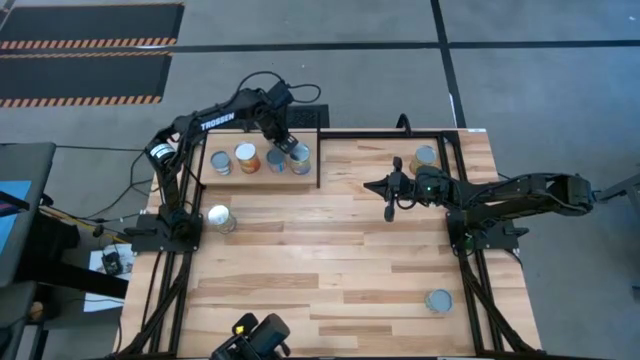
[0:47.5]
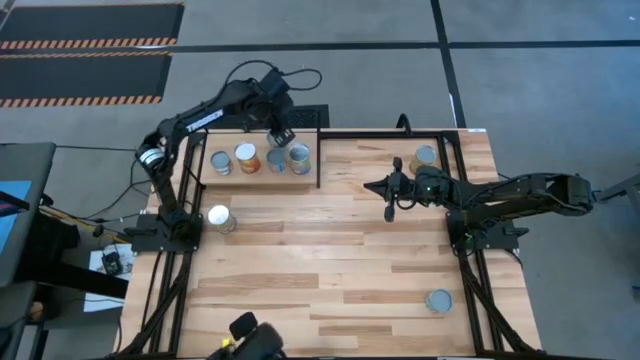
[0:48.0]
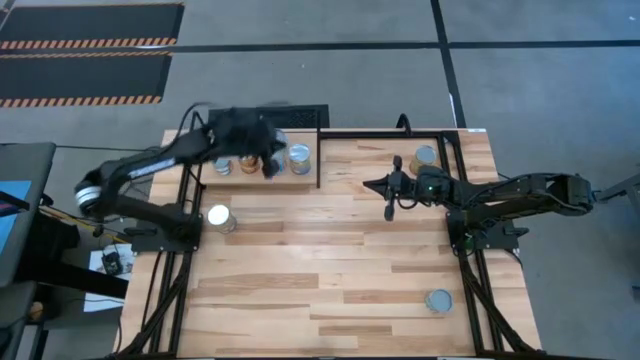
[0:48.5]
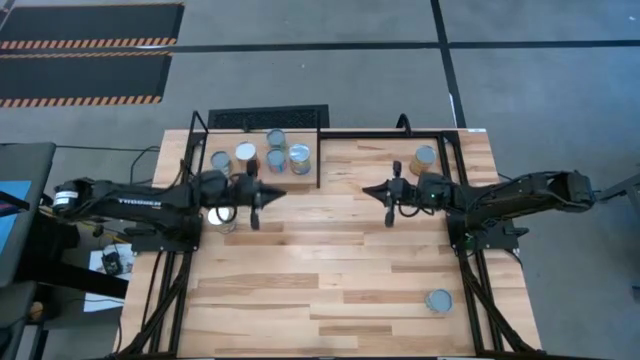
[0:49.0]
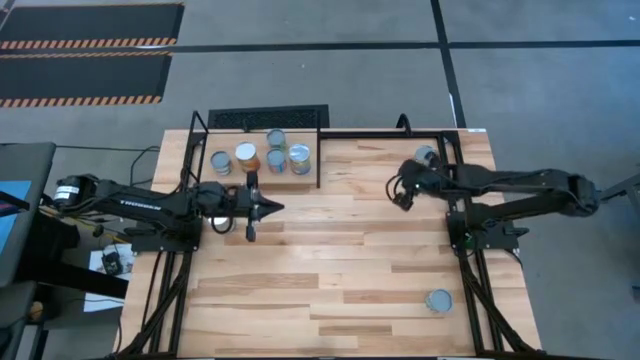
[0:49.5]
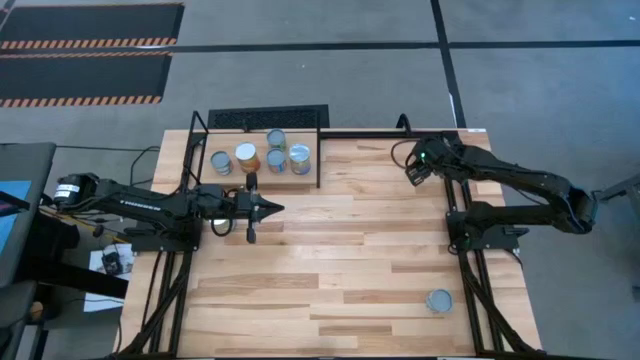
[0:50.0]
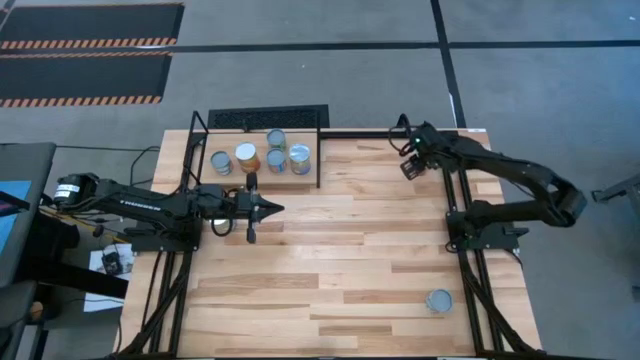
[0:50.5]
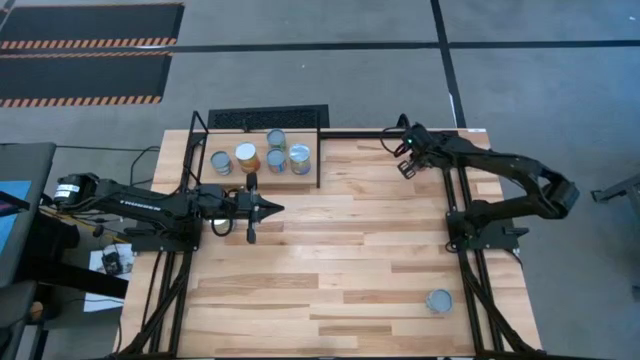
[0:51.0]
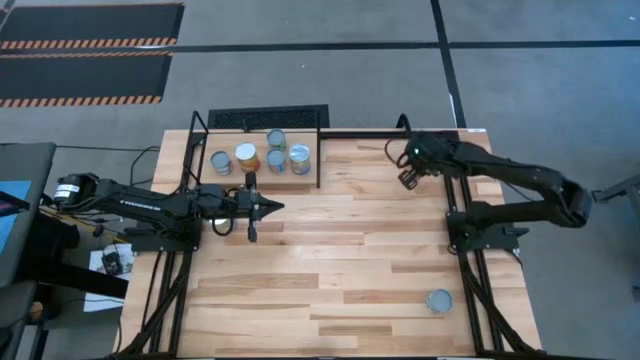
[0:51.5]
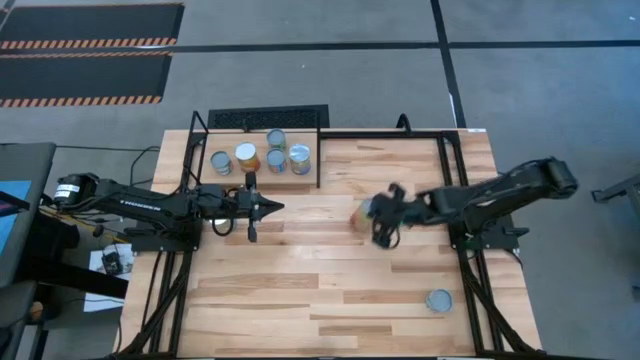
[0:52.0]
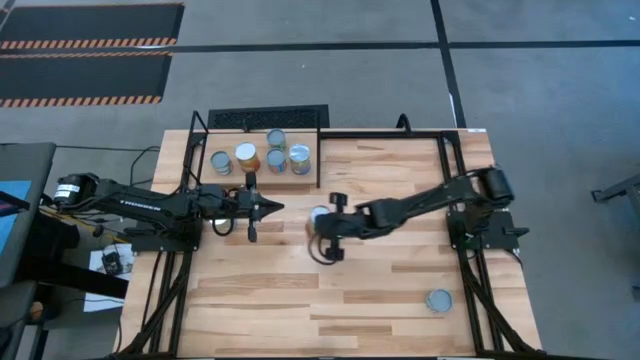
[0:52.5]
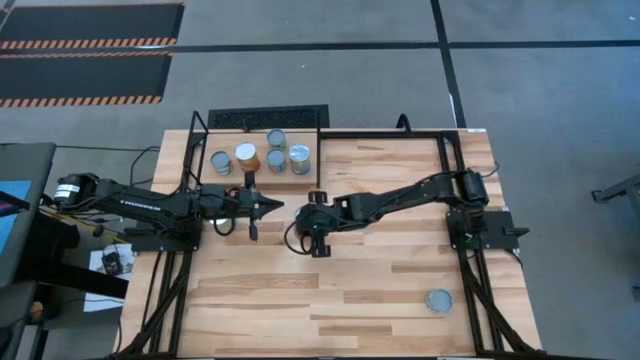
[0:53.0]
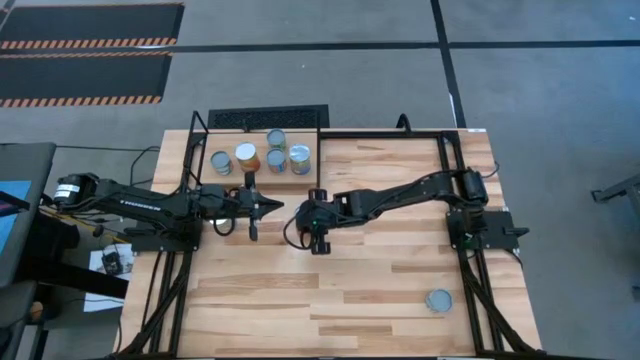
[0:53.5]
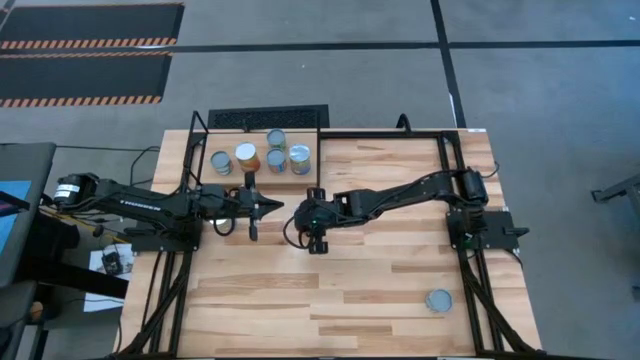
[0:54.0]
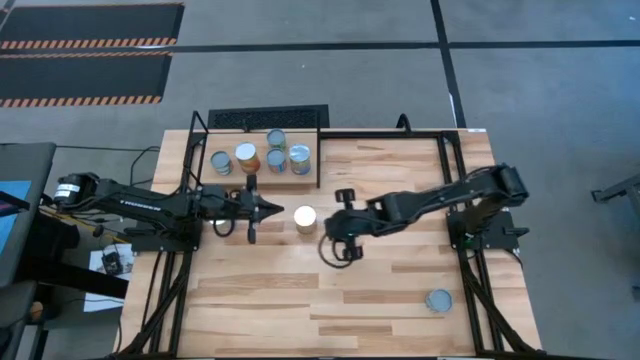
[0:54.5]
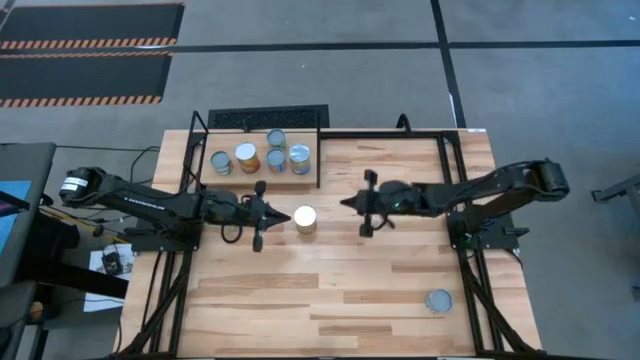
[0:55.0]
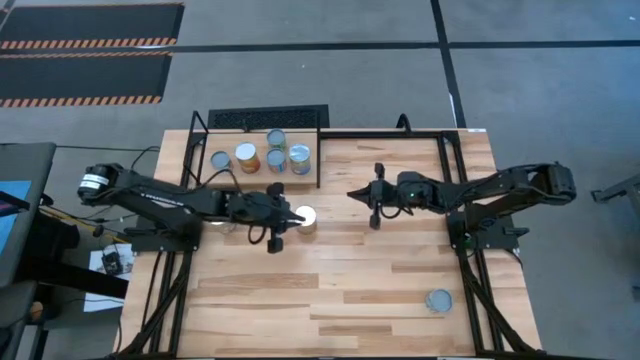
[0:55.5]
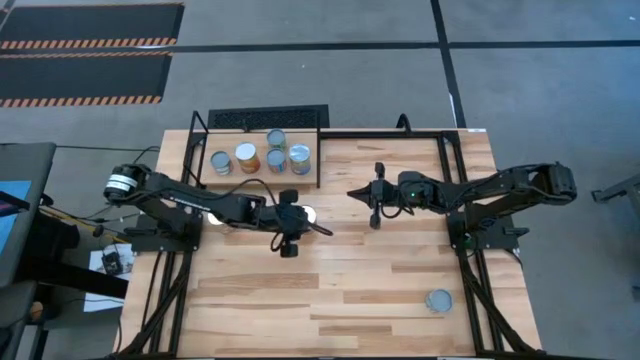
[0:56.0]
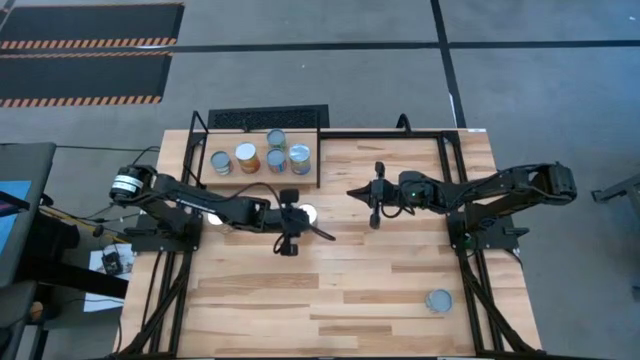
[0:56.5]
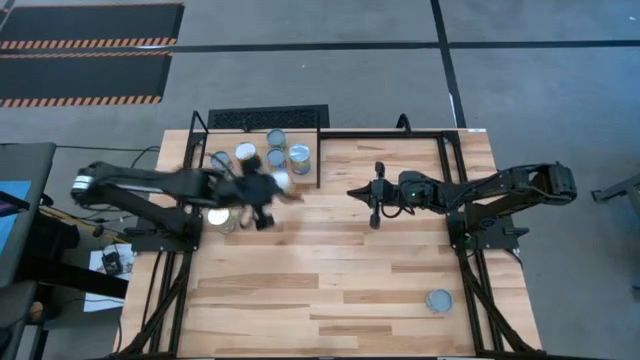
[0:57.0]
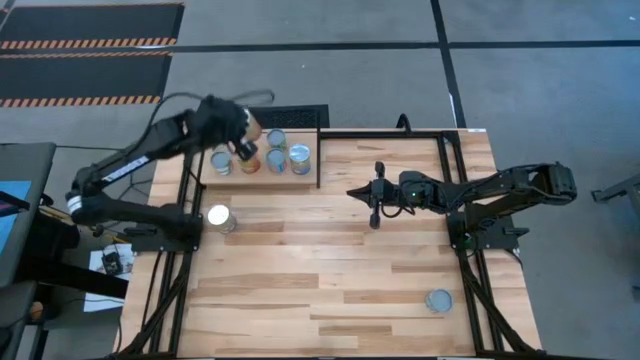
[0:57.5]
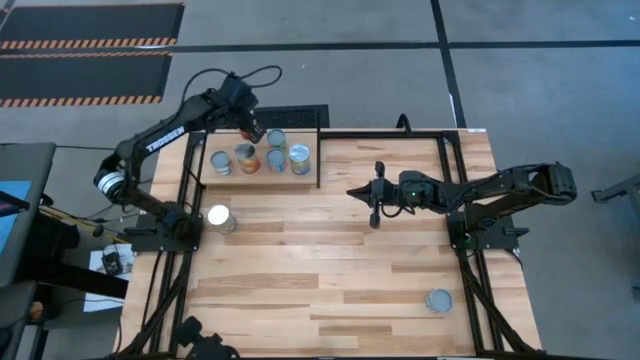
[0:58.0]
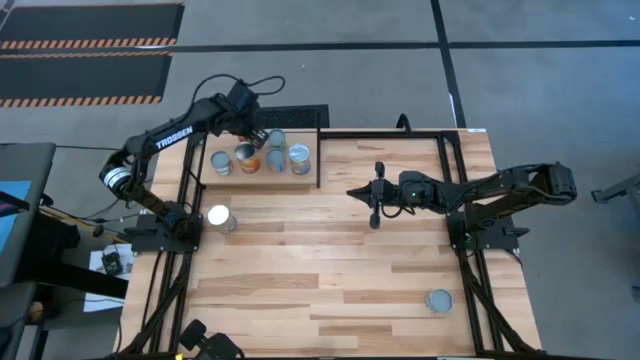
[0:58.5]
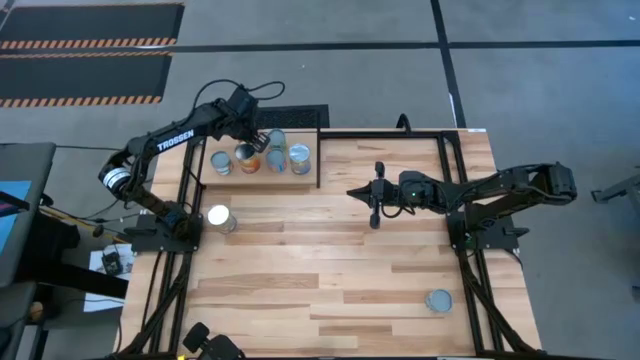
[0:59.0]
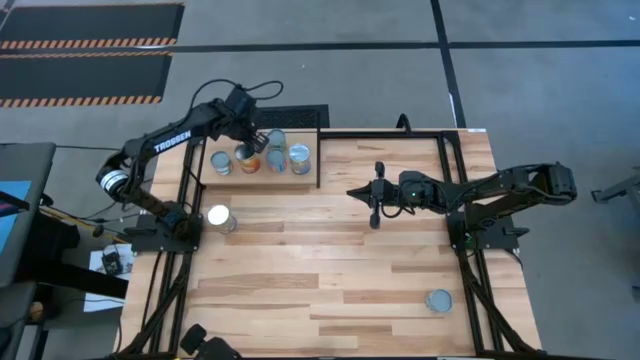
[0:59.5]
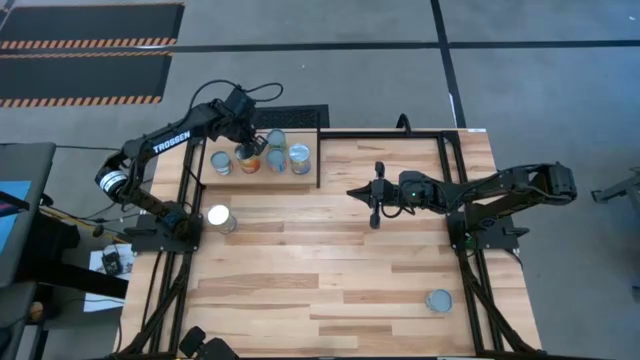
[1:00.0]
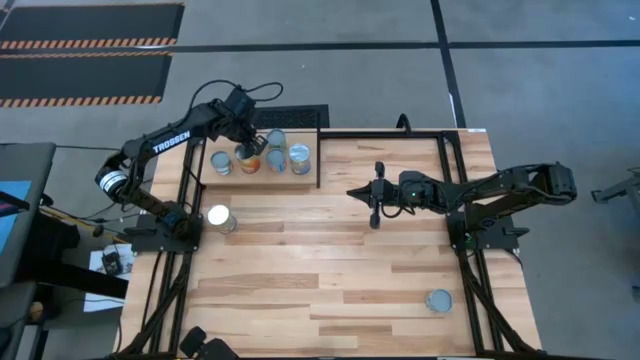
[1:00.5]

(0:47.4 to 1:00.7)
Task: Pick and place cans onto a shelf
Put the canned green beans on the shelf

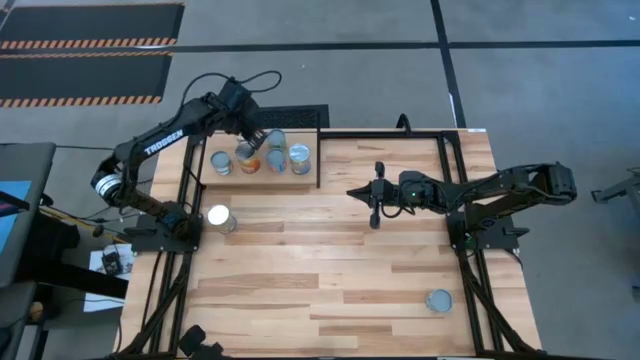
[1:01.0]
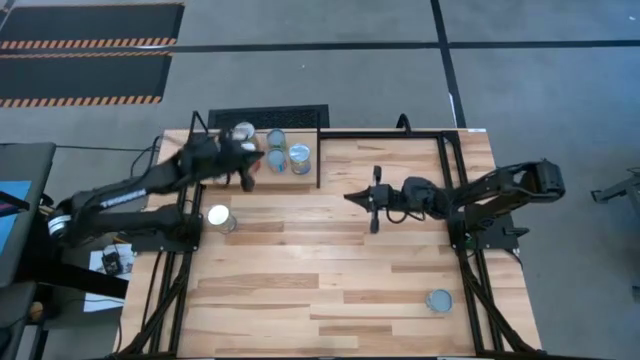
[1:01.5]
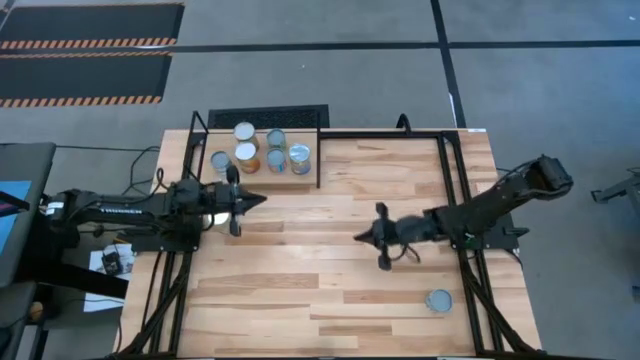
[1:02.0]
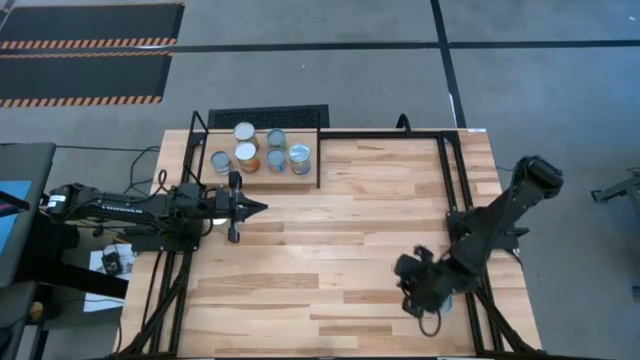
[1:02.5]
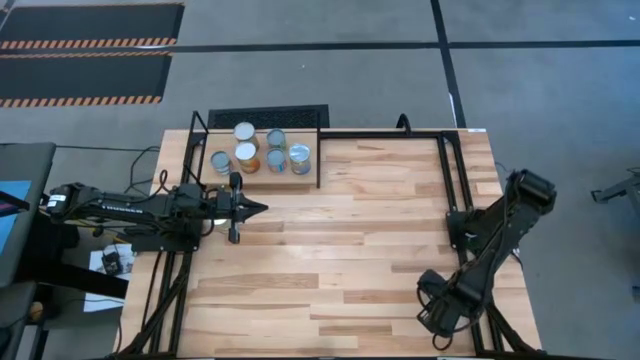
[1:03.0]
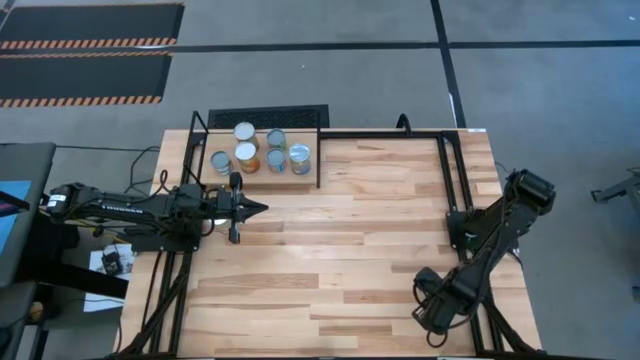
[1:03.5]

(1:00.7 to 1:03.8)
Put the canned carrots on the shelf

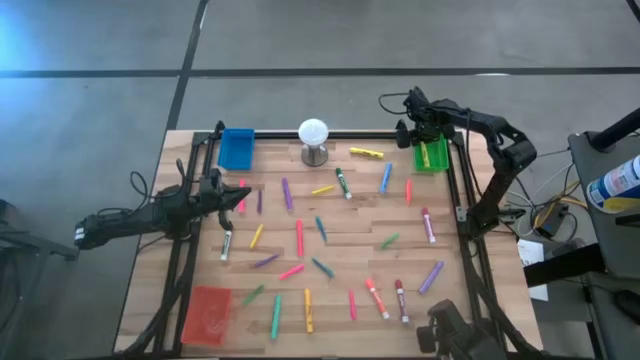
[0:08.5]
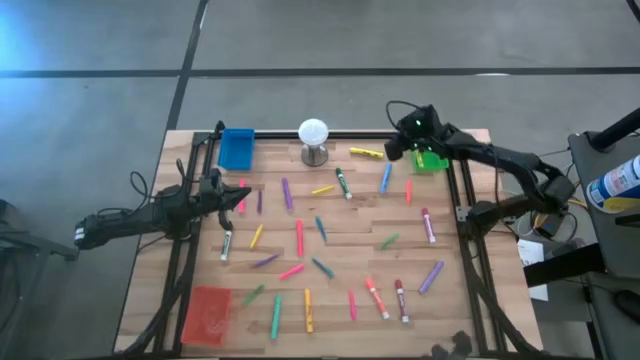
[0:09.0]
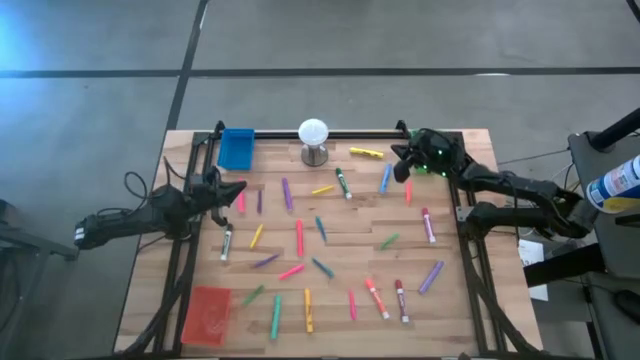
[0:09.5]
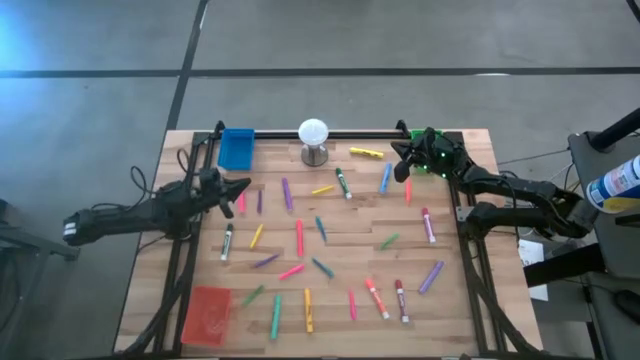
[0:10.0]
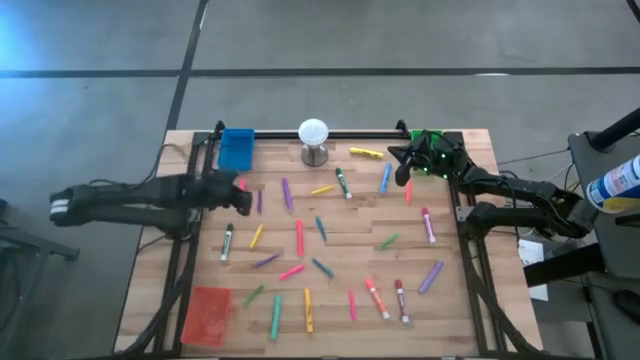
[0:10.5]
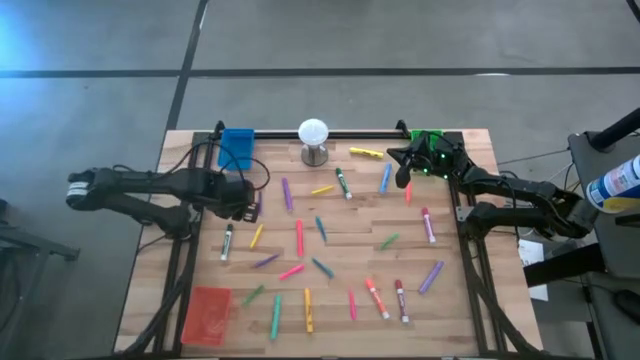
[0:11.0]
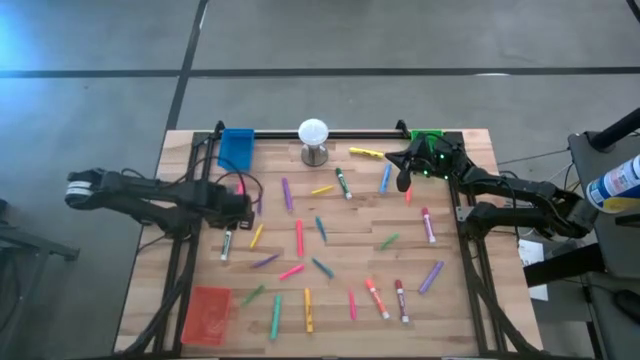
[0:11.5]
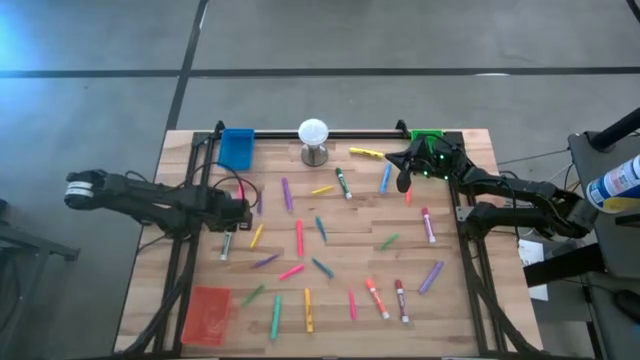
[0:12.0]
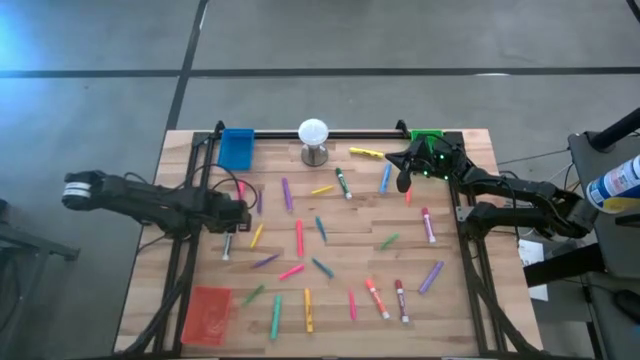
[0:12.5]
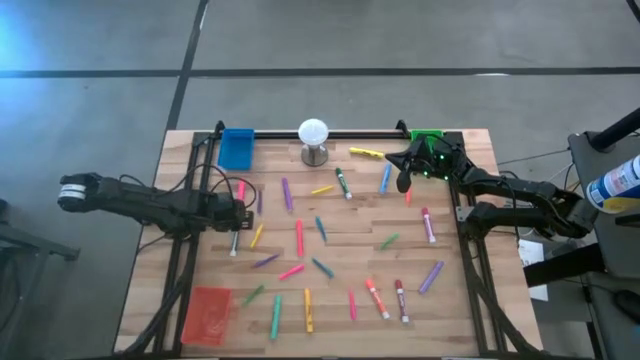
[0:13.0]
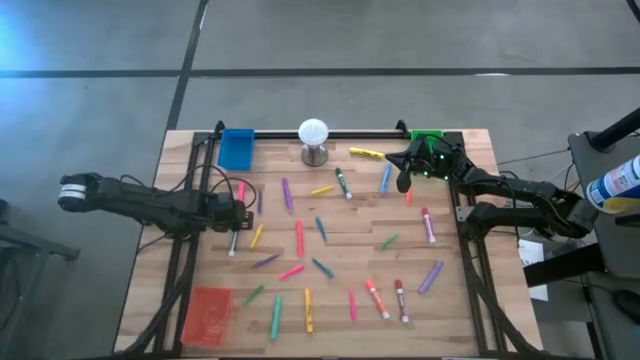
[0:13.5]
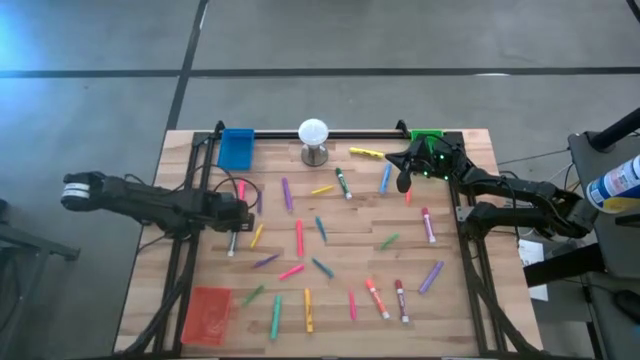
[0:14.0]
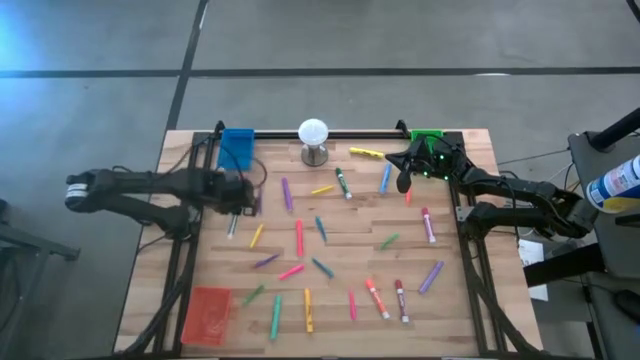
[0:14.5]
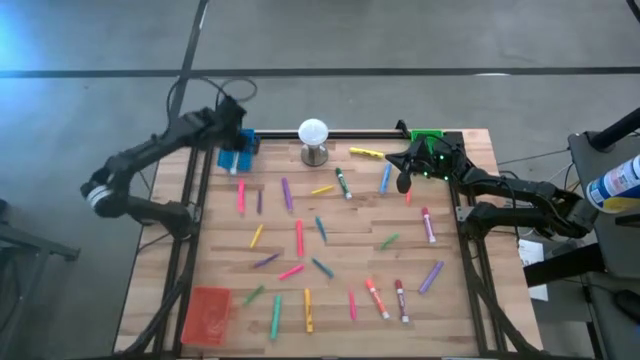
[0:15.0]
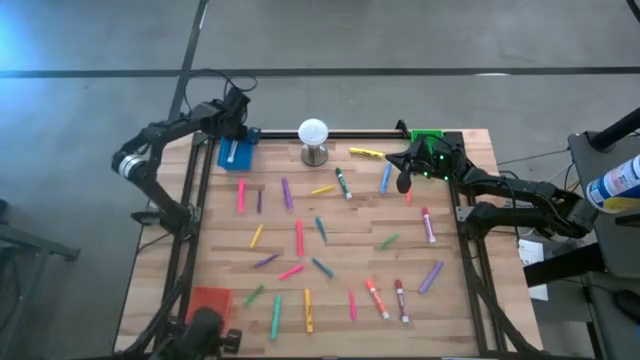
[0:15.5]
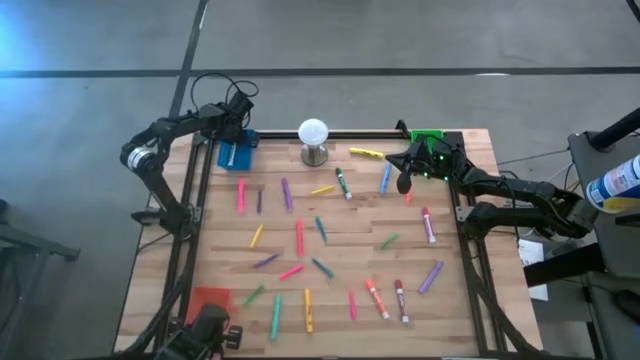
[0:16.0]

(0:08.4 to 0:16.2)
Task: Pick & Place Markers
Put the dark green marker pen into the blue bin
